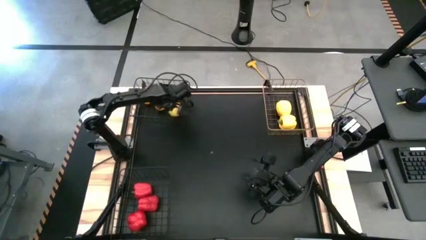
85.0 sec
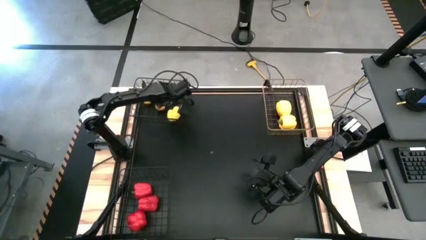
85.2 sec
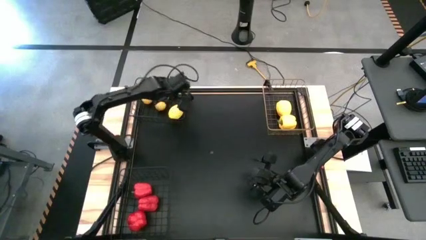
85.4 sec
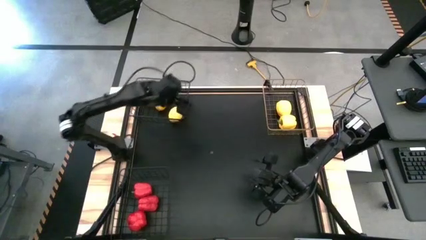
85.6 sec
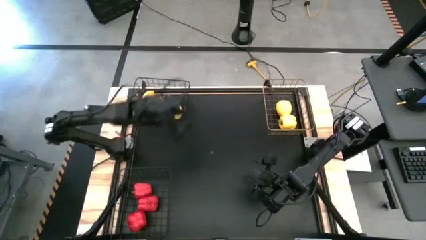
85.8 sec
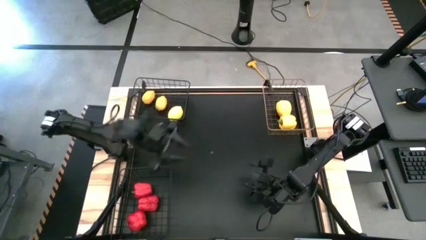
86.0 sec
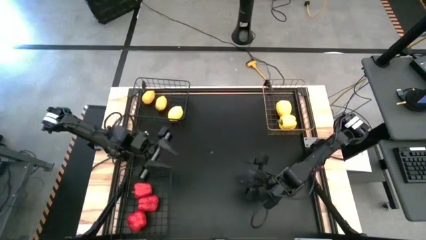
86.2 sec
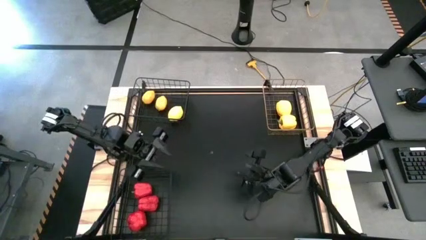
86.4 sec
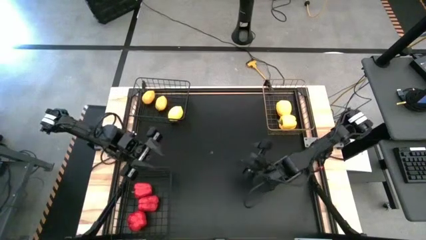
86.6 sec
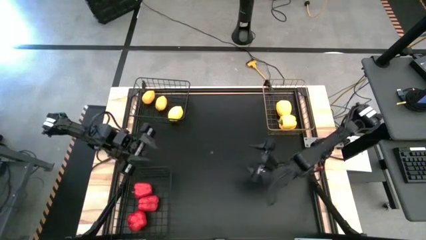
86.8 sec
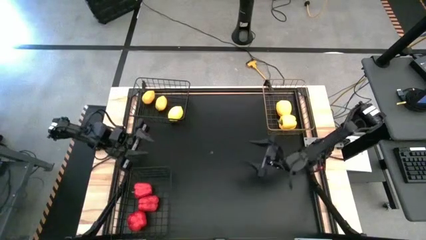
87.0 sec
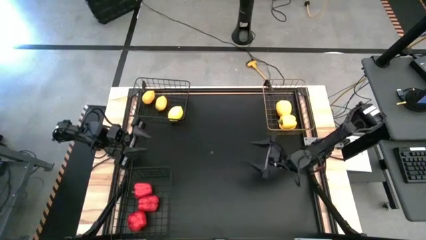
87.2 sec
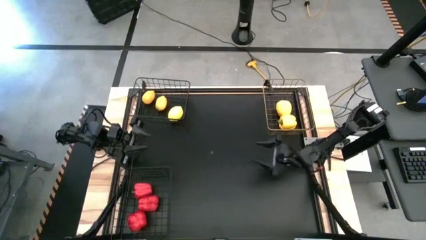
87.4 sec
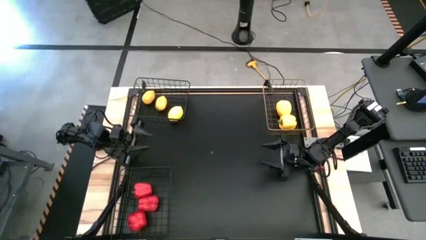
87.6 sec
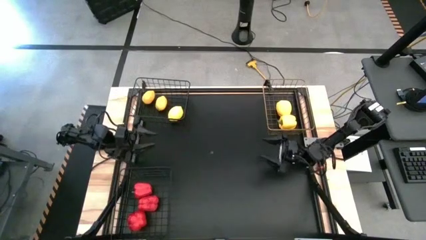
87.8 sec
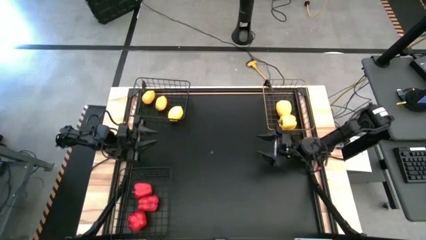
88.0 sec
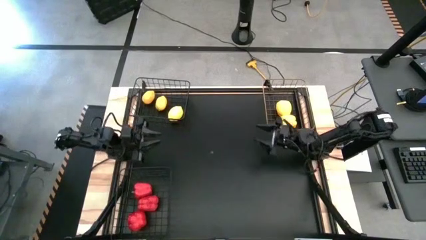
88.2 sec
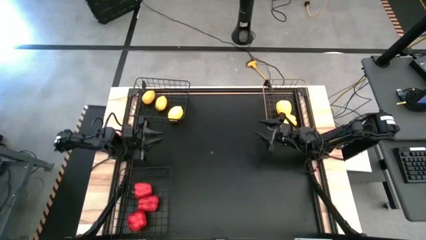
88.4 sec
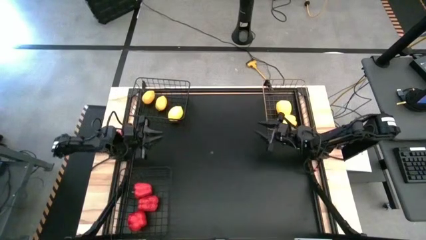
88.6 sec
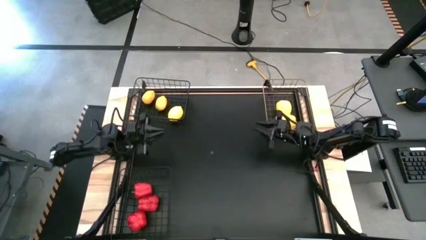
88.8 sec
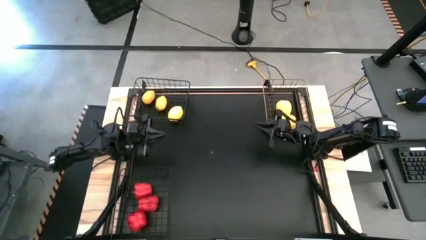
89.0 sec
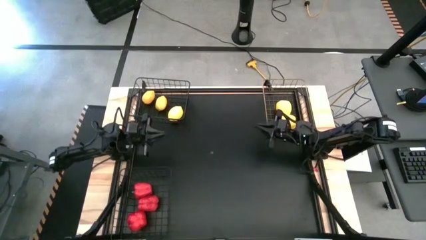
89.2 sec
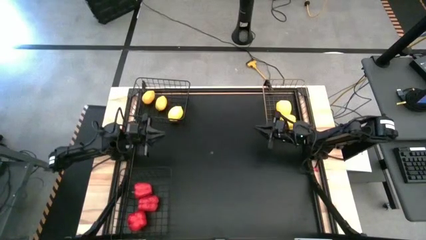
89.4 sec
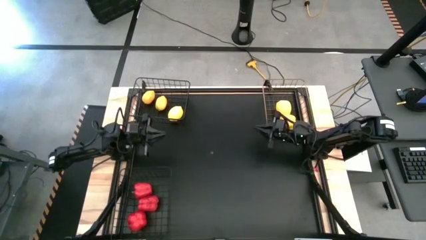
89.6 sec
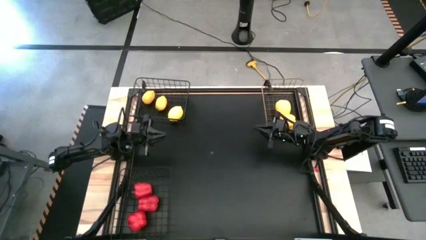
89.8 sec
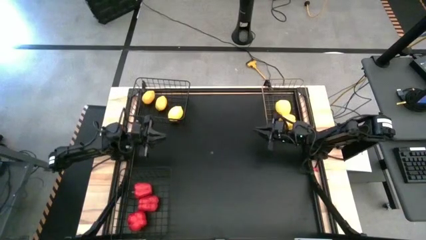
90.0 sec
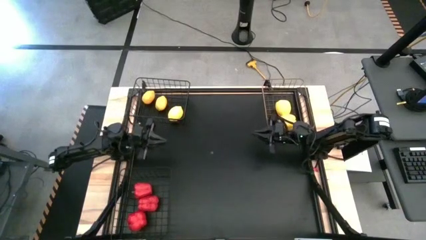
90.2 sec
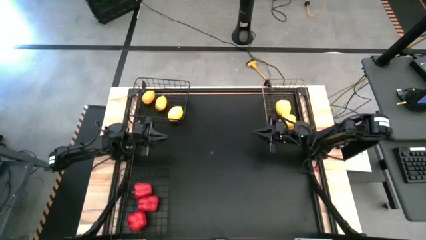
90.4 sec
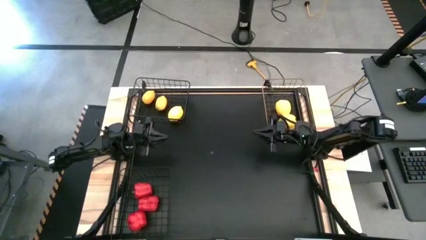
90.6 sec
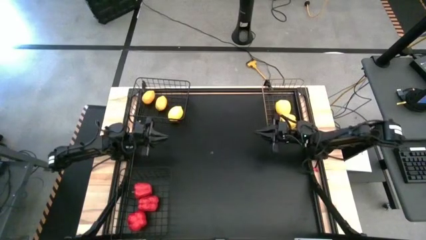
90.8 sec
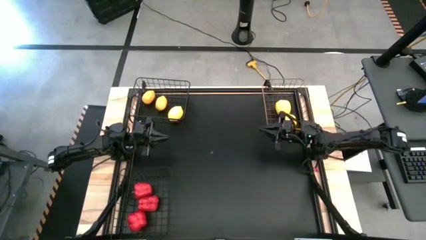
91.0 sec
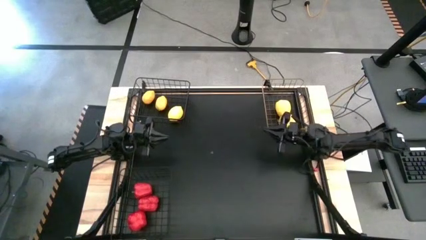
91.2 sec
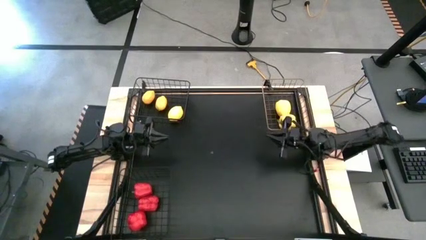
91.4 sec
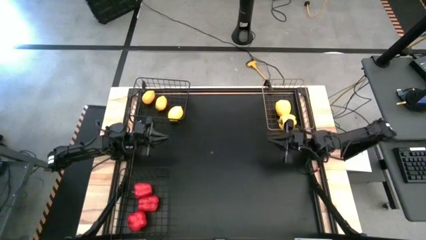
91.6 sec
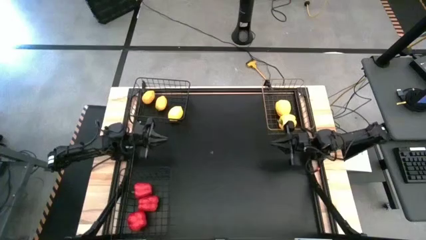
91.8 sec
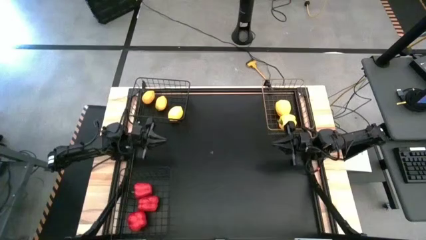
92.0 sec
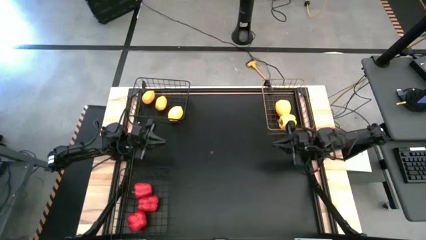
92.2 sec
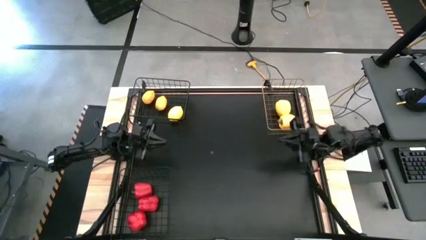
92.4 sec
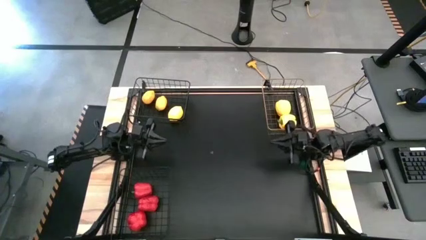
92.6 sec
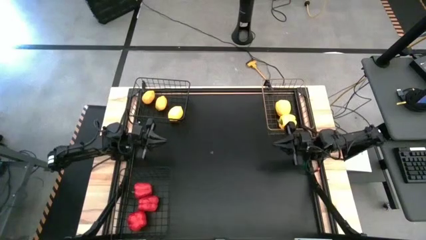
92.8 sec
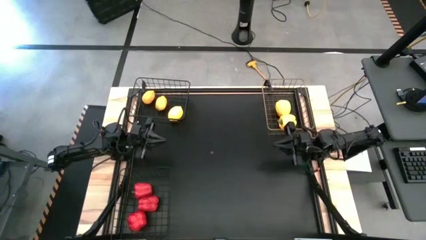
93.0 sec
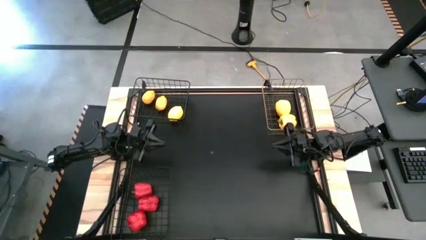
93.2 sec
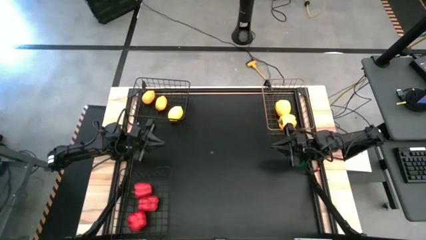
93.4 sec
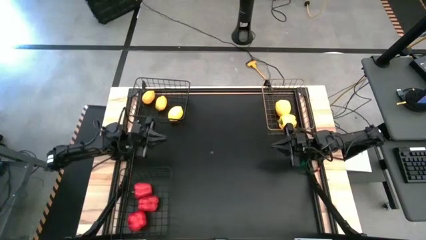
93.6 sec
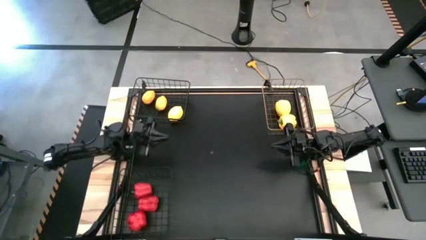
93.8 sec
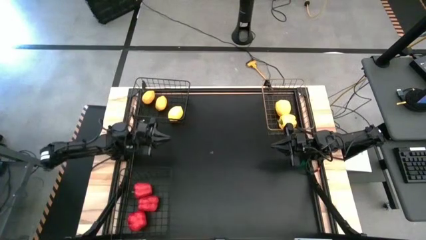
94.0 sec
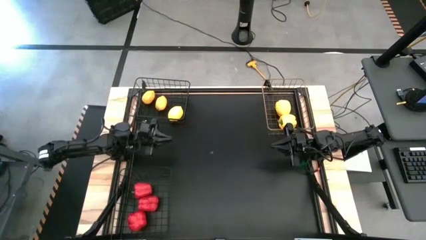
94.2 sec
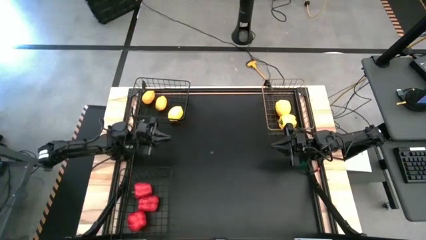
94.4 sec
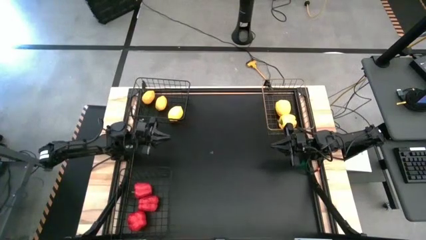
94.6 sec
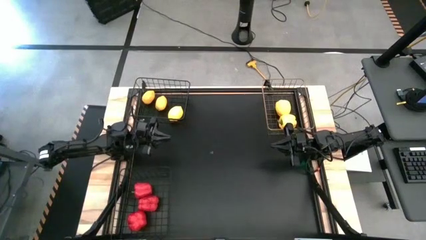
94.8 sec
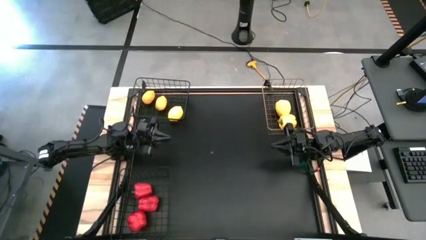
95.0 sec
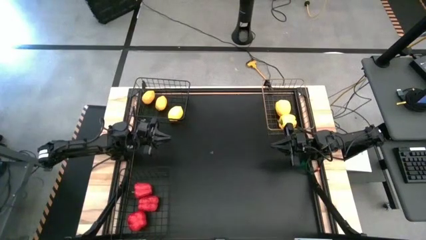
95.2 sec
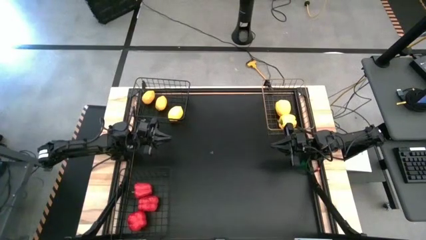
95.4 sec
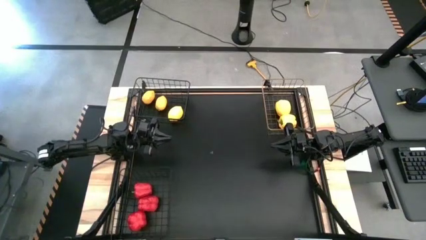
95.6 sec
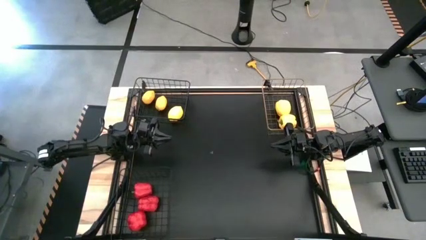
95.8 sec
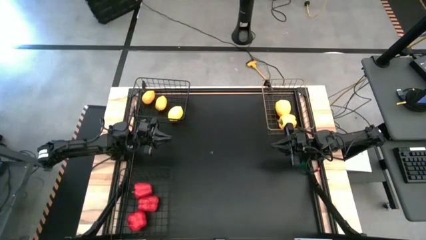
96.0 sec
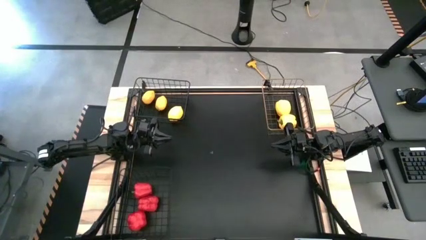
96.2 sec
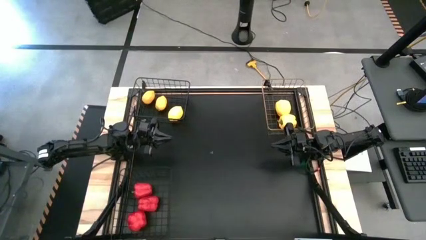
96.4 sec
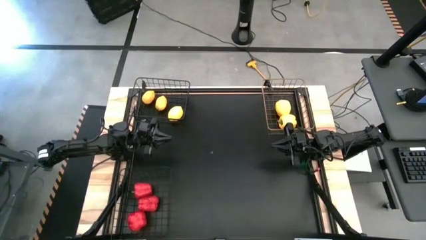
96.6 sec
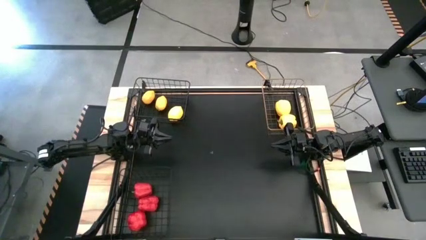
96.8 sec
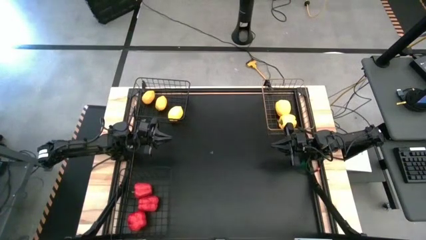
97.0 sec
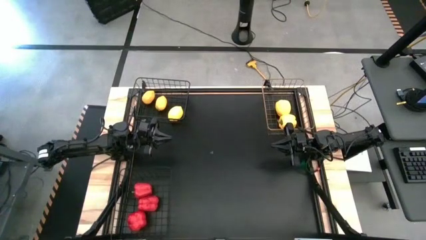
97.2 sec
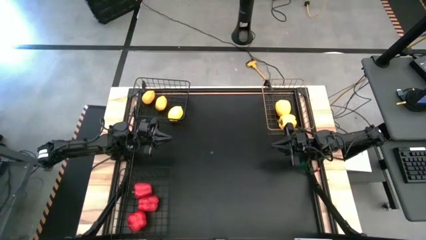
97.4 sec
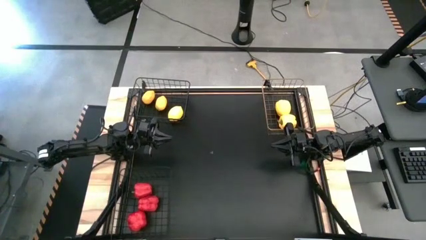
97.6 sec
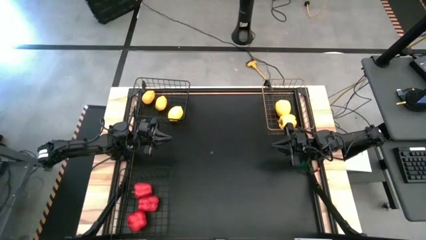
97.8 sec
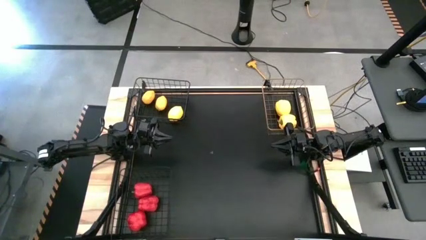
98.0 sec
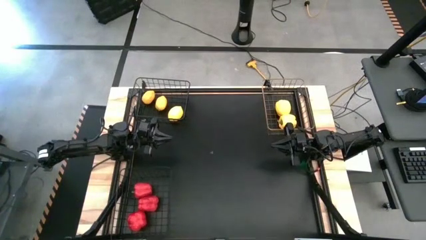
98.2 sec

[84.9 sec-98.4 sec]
Task: Sort produce into baskets
Return to Home Position

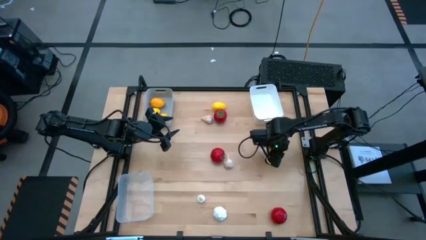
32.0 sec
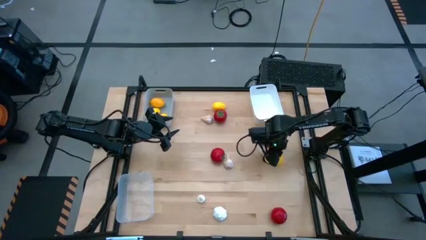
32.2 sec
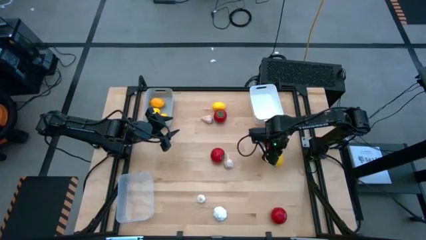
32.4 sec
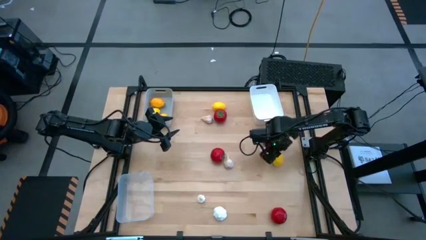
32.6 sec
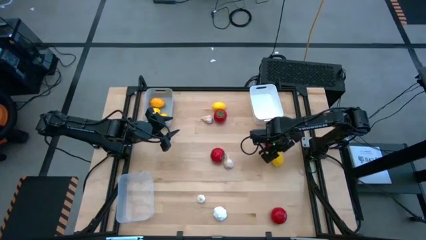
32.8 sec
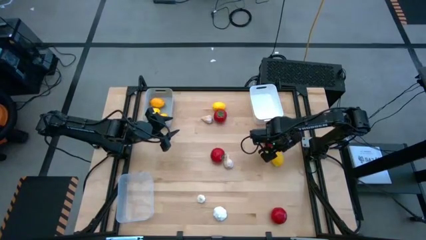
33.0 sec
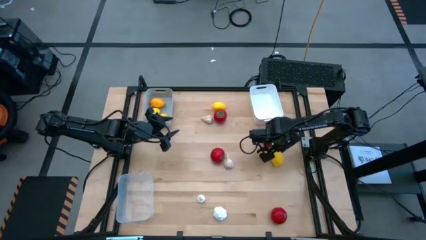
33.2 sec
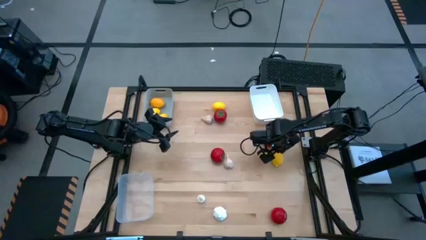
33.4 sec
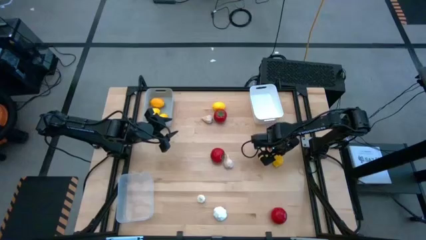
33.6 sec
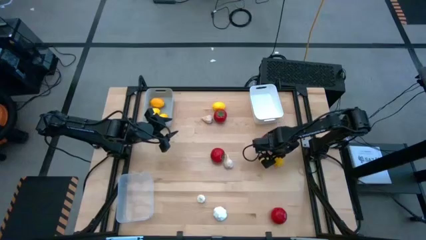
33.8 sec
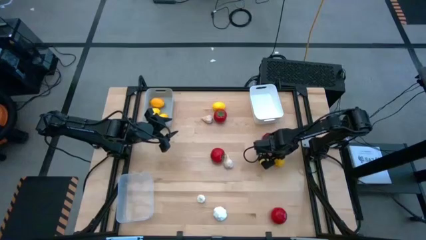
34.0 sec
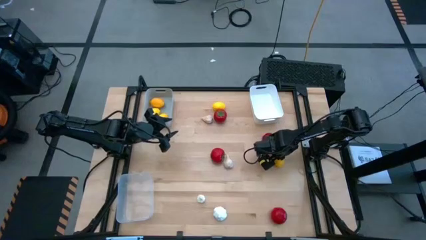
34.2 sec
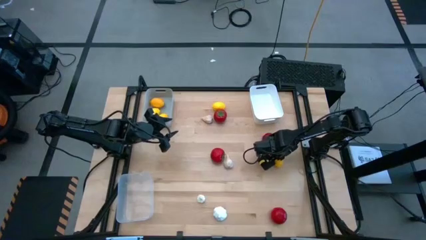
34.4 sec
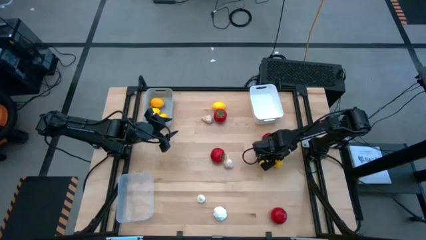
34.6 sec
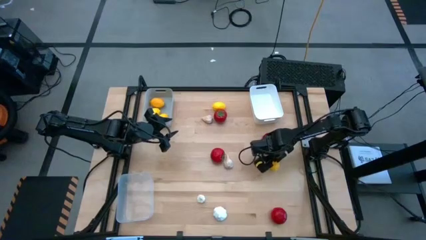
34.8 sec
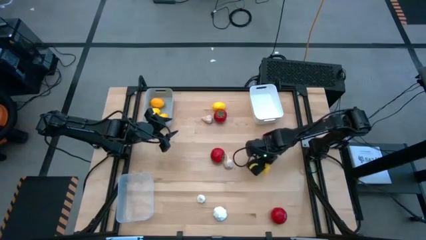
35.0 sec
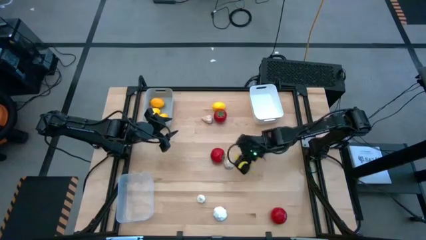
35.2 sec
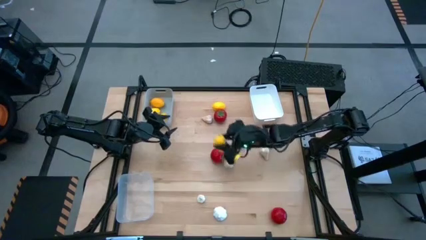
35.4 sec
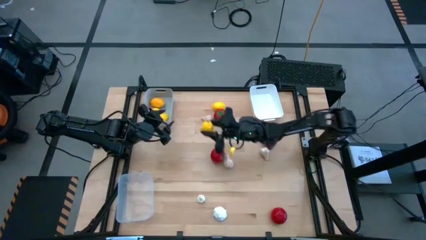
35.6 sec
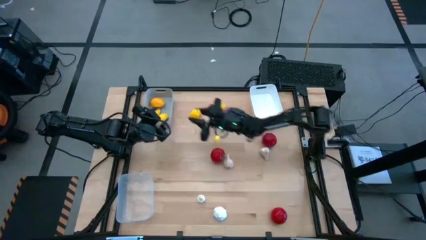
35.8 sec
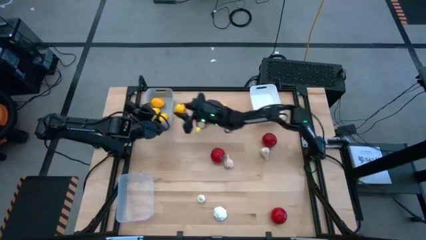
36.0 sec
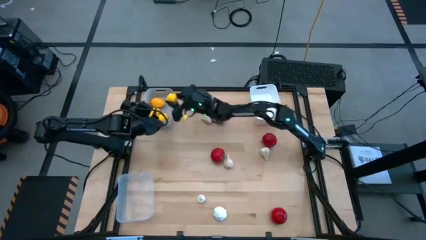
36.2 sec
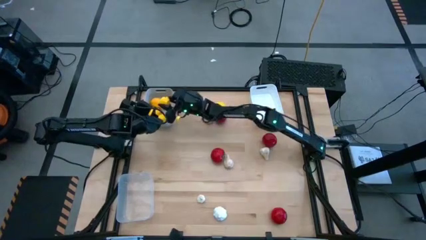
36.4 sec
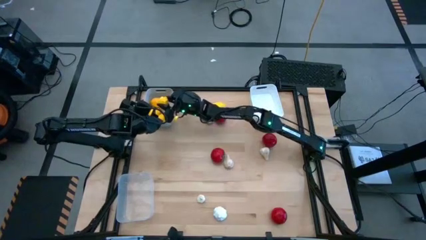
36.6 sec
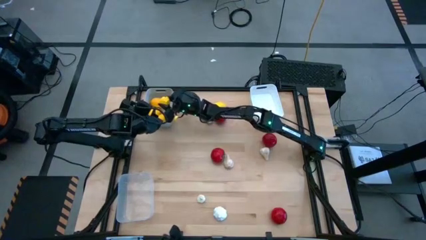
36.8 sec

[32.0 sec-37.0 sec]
Task: Sort produce into baskets
Put the yellow lemon into the gray bin
